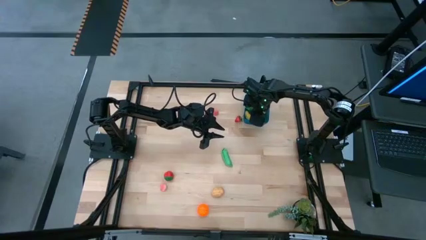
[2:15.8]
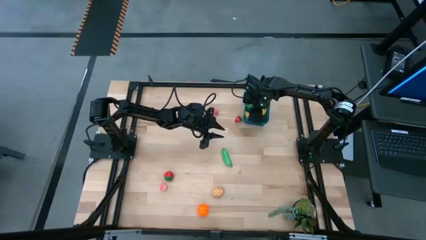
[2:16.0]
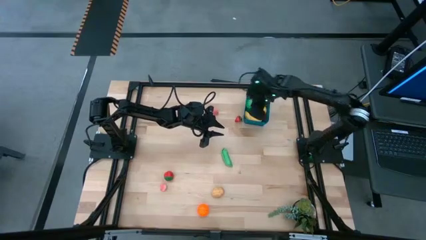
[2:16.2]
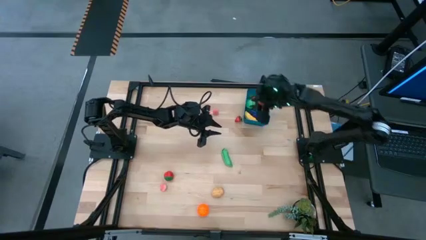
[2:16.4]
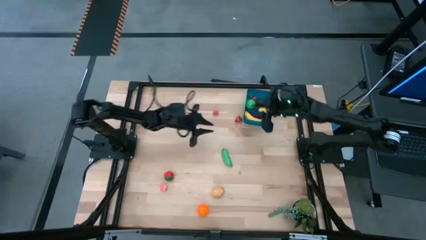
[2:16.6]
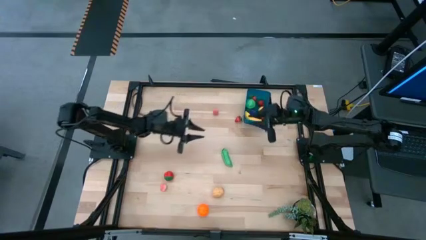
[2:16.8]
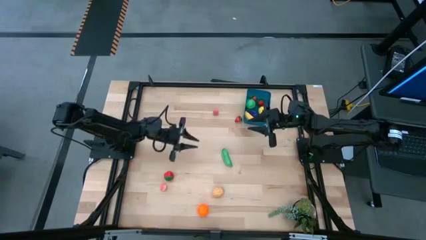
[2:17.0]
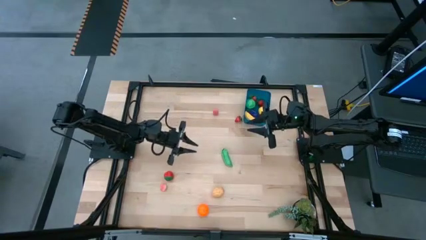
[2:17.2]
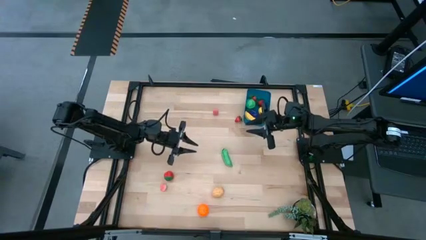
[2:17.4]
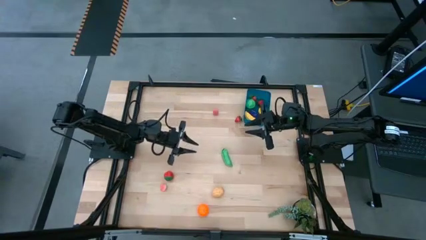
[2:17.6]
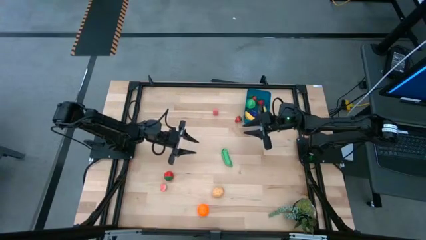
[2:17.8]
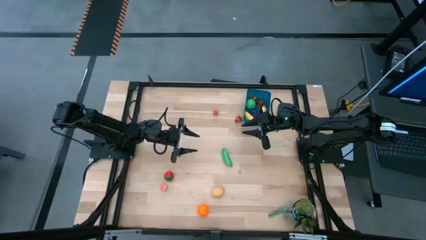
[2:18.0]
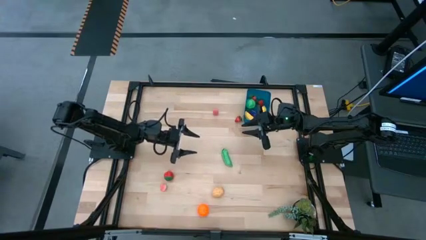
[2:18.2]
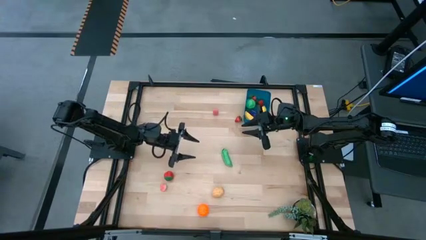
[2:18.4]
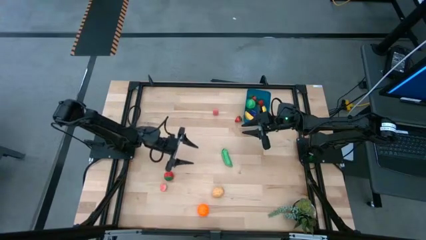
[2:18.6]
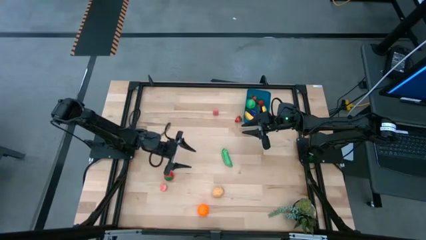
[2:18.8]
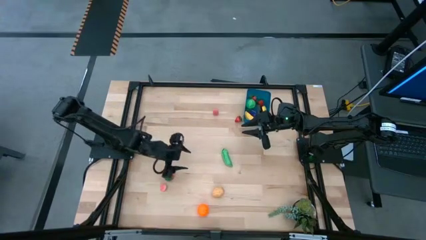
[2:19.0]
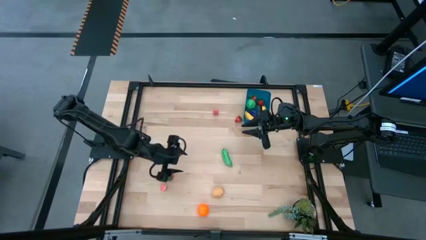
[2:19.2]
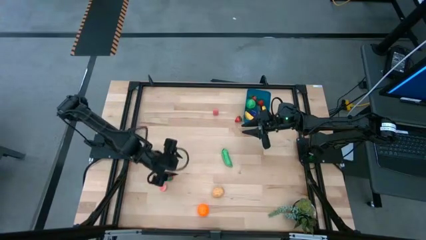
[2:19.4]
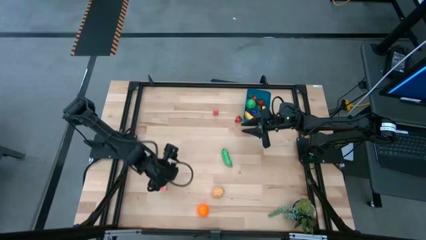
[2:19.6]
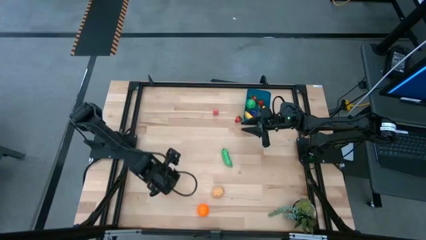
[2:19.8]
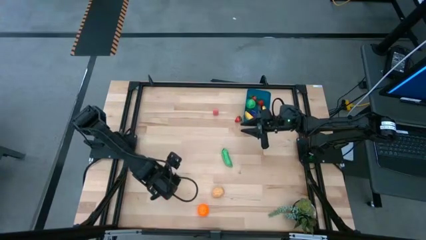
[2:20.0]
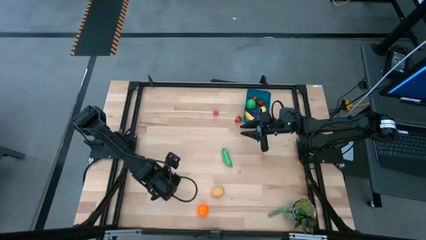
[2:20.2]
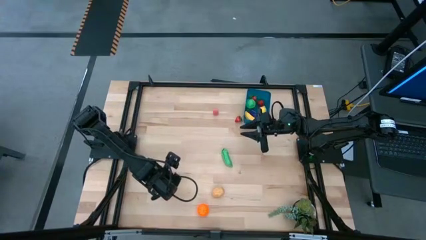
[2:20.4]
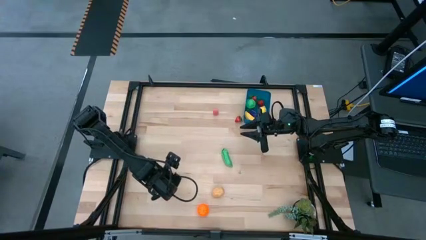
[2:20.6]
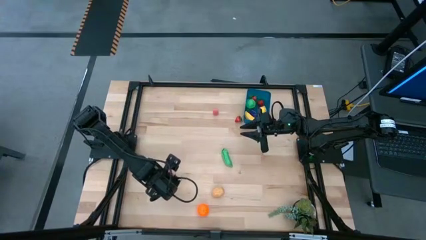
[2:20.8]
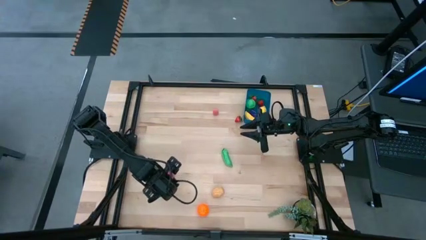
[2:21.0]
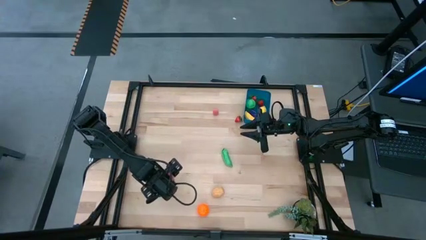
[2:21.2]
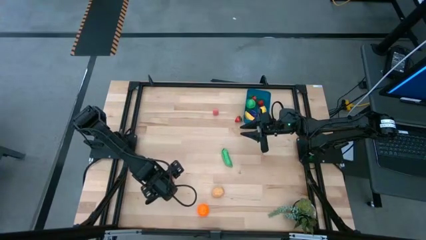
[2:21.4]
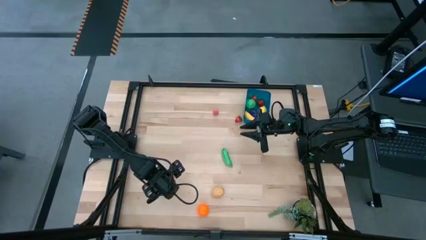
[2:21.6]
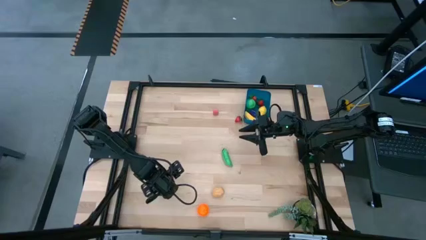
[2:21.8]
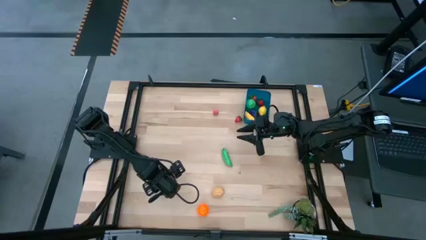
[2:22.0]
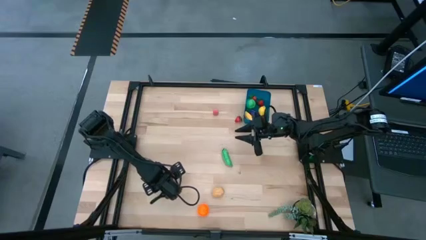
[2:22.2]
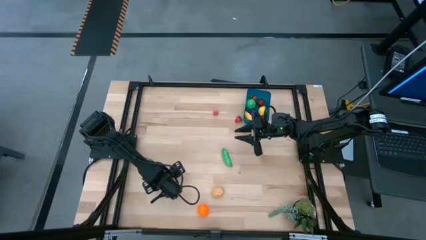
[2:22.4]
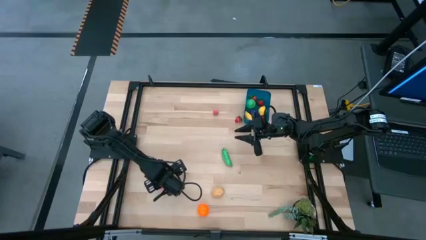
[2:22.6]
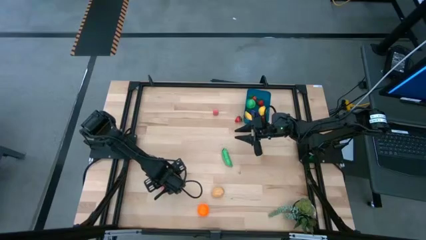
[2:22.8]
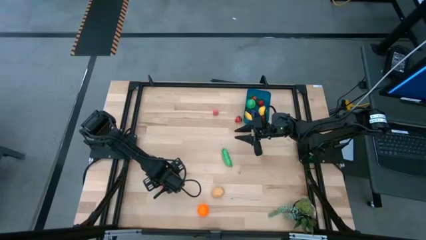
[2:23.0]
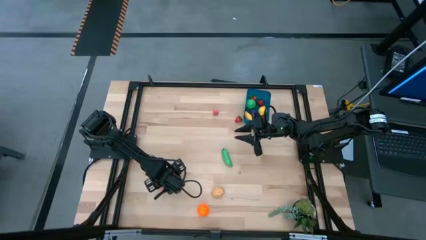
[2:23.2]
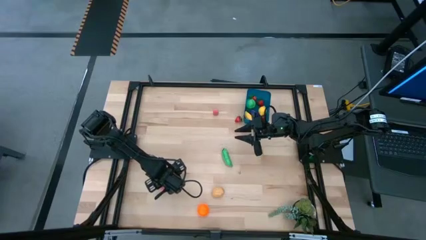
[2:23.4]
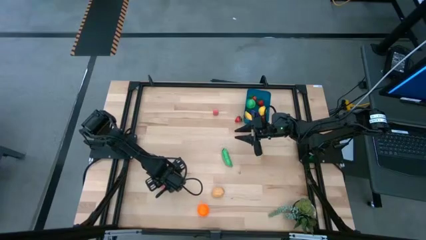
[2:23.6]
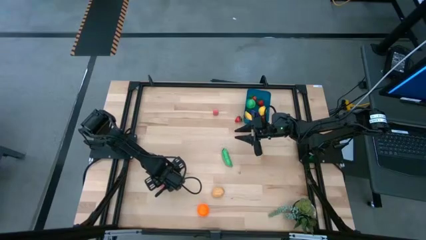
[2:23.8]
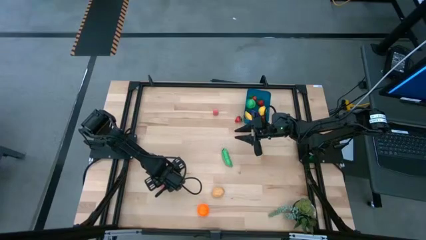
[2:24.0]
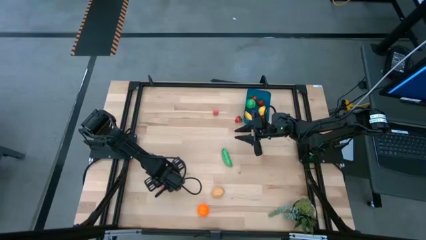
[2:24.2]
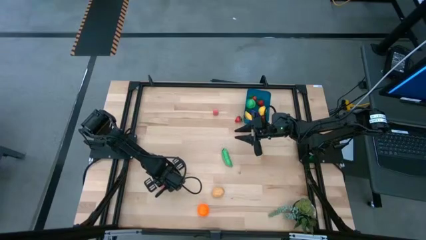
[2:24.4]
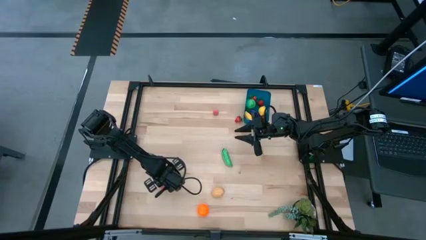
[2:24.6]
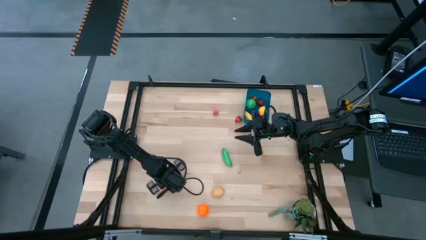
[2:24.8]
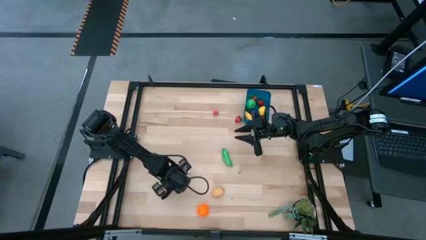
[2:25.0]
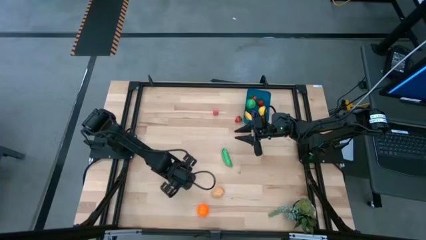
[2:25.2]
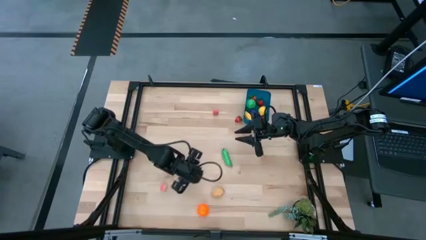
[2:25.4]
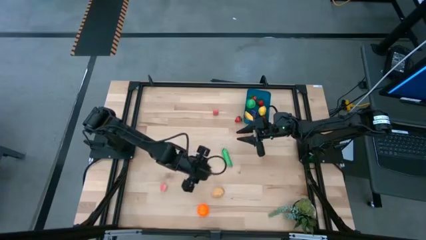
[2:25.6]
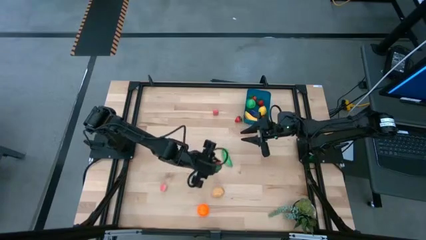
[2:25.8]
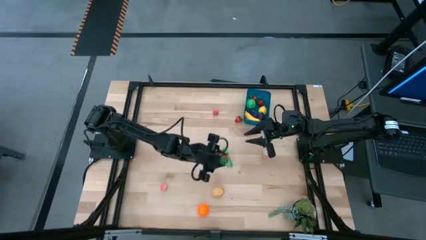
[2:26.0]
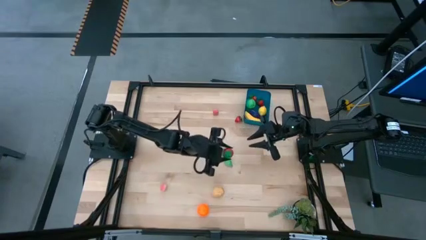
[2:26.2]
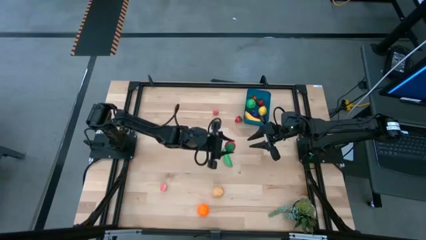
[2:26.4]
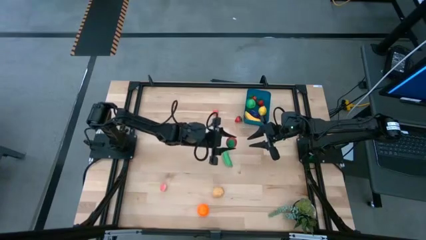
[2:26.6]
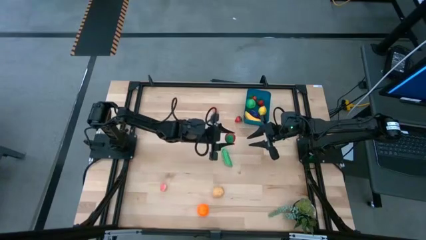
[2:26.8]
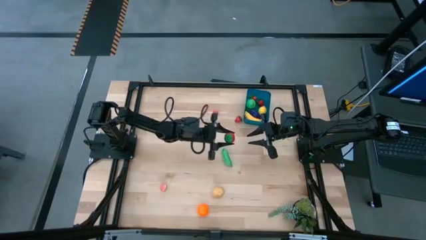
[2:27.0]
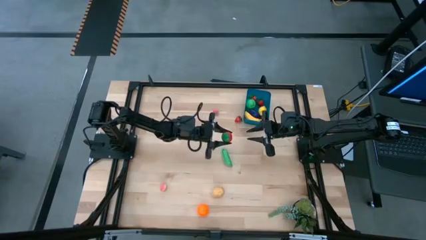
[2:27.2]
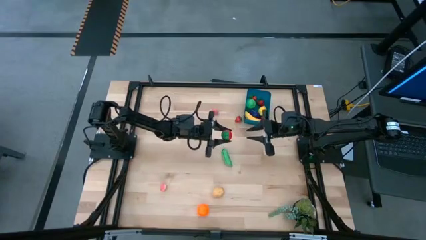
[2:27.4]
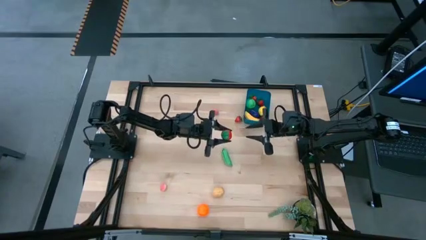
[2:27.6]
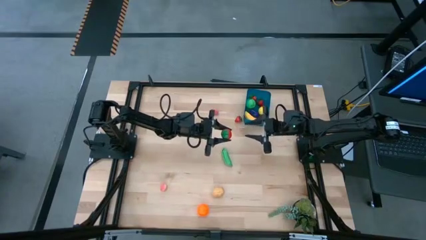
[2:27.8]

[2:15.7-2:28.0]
Task: Pick and placing Produce into tupperware
Put the red strawberry into the blue bin

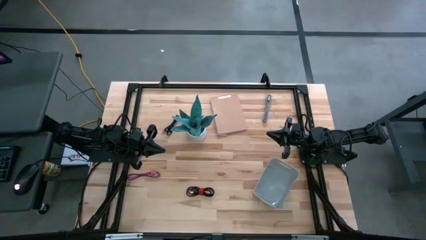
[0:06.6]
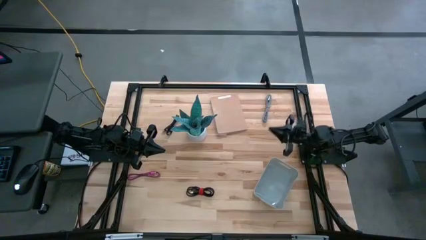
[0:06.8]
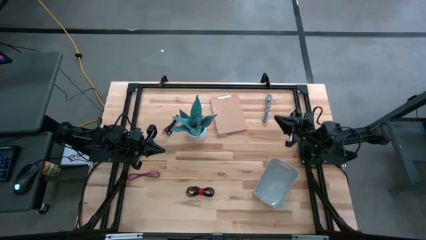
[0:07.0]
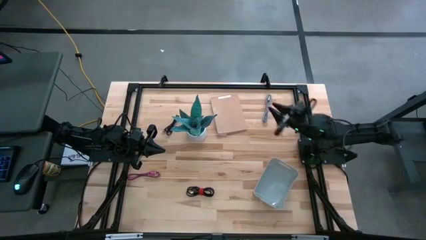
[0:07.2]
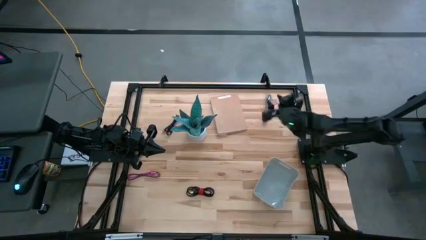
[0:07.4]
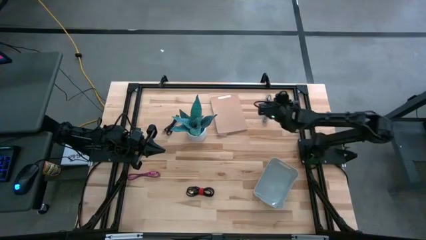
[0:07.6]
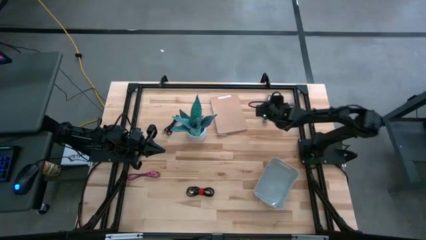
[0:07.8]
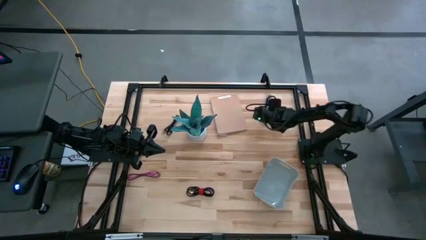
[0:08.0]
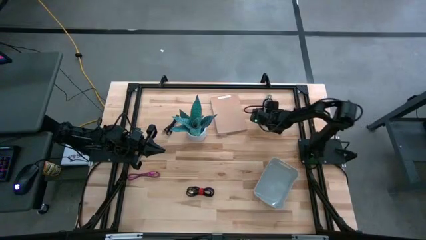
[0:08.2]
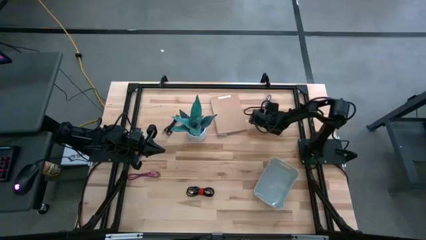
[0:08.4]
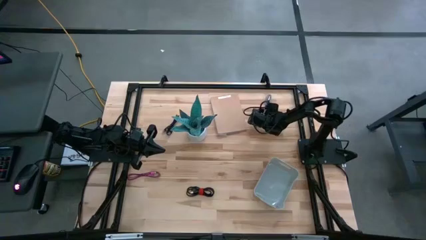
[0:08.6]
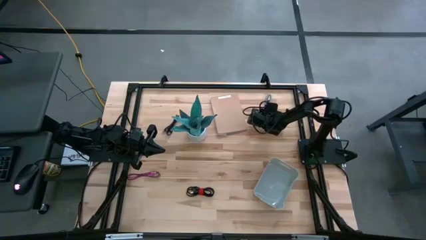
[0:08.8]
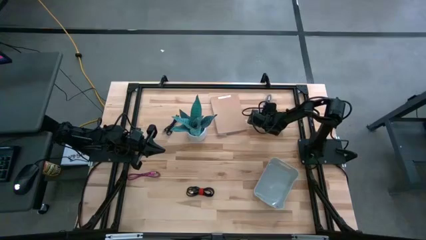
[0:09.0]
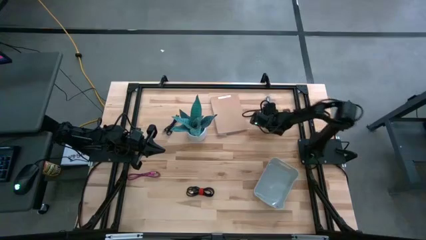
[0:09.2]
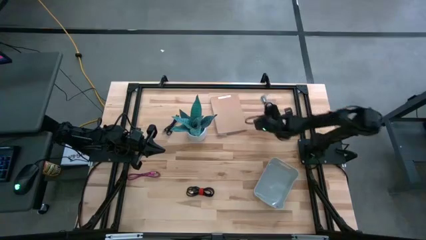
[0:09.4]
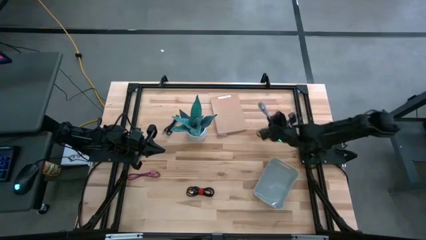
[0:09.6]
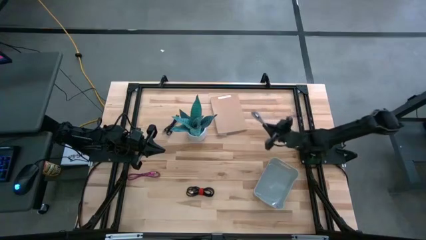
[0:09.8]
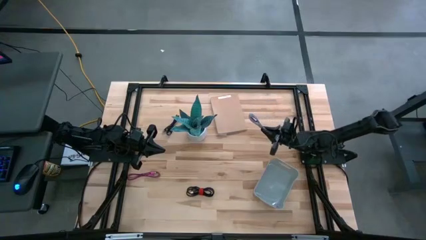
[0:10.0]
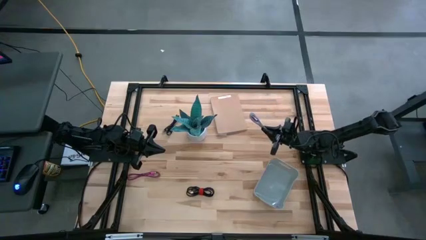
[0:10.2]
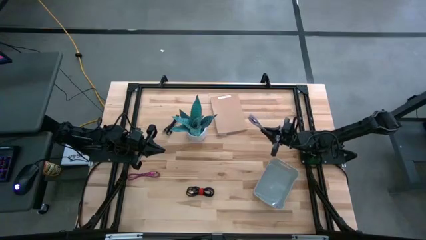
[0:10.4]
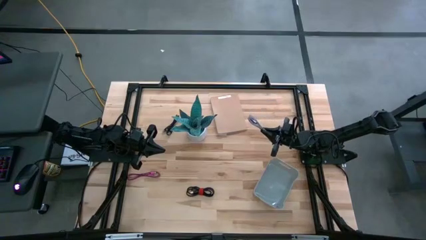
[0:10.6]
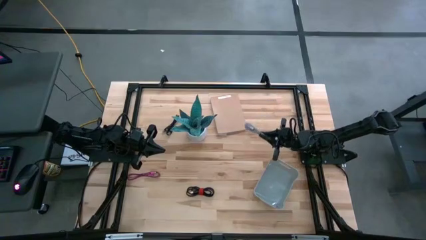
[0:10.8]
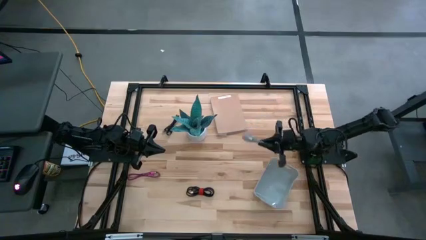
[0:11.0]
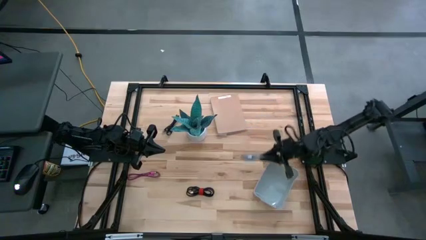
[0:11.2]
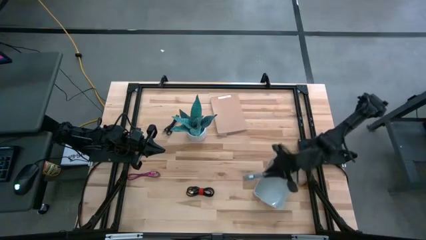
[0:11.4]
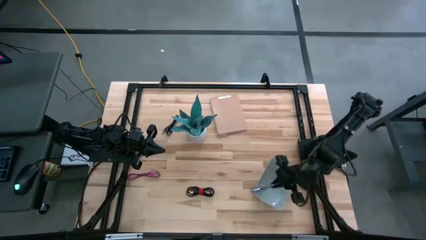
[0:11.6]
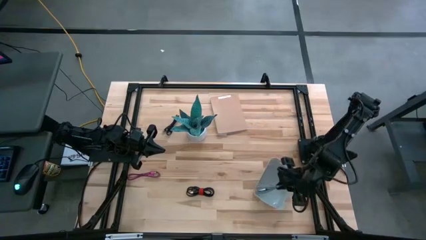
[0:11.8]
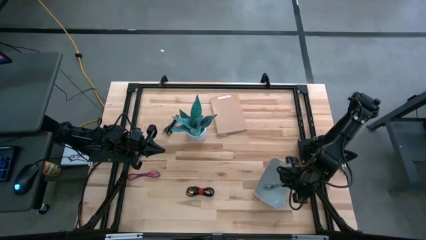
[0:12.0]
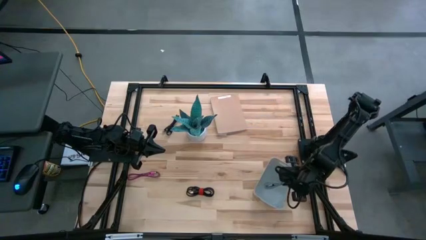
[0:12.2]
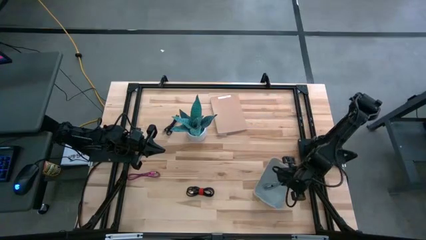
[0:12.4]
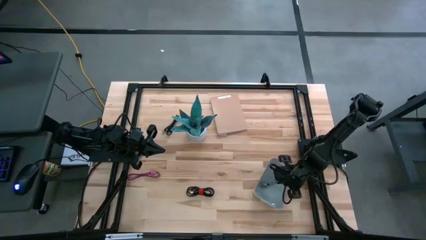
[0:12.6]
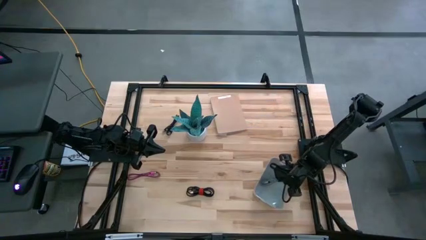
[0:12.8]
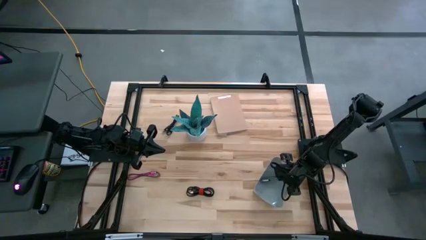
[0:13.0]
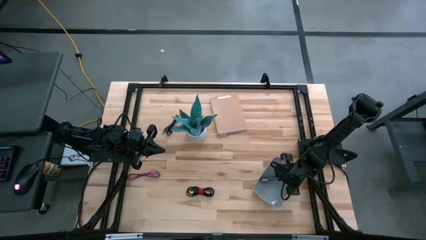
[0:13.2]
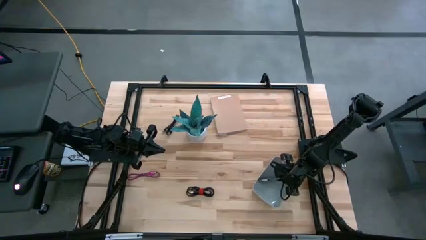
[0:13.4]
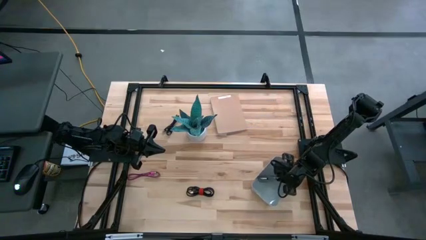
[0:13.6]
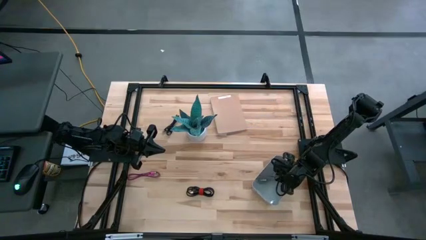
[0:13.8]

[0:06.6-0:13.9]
Task: Pick and place USB-C Cables
Put the white charger cable into the white bin
